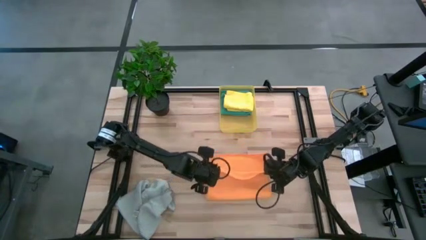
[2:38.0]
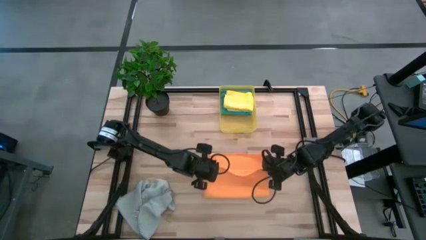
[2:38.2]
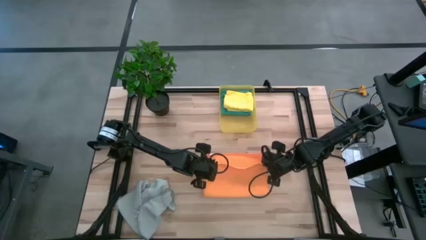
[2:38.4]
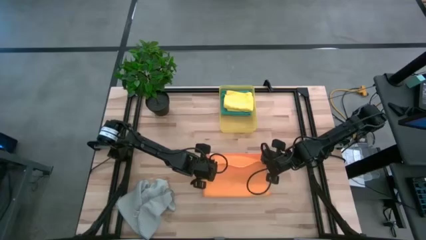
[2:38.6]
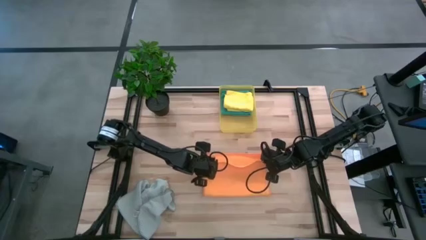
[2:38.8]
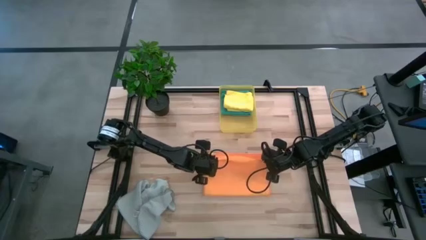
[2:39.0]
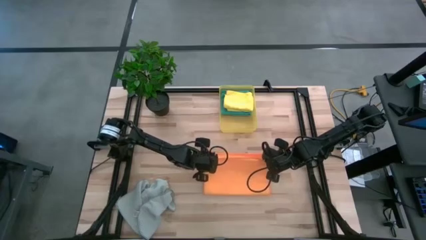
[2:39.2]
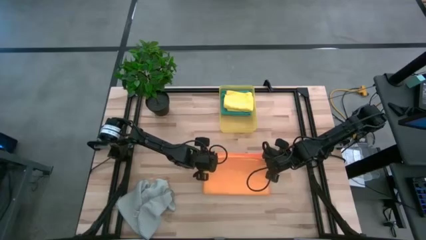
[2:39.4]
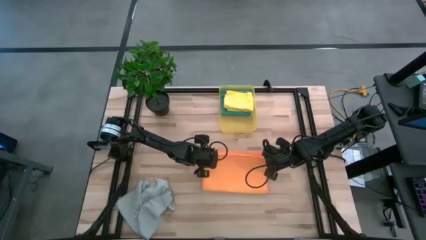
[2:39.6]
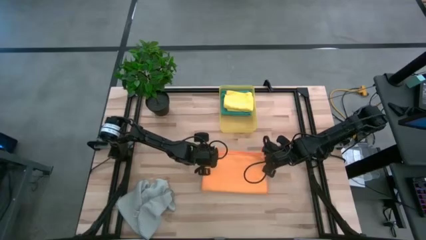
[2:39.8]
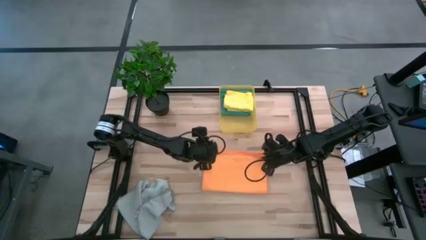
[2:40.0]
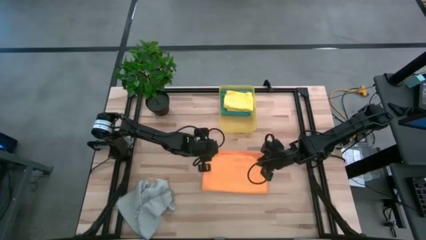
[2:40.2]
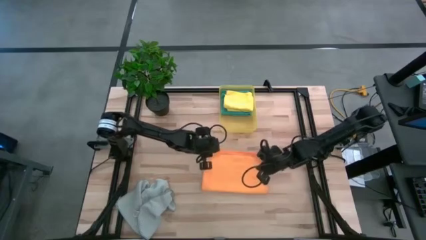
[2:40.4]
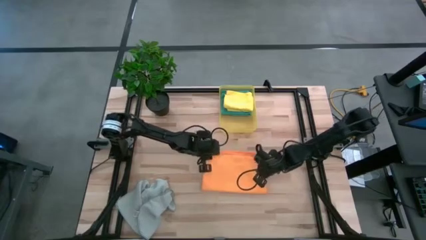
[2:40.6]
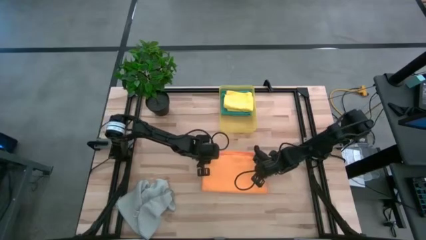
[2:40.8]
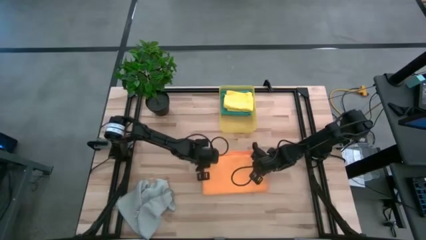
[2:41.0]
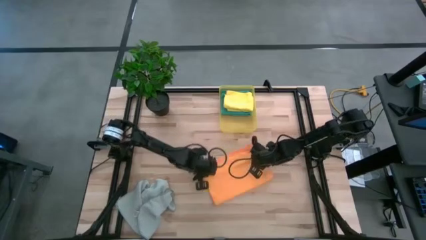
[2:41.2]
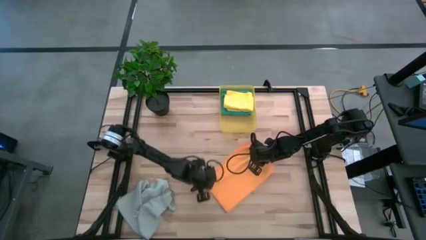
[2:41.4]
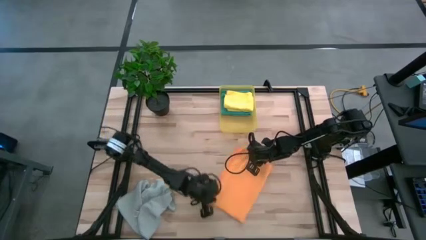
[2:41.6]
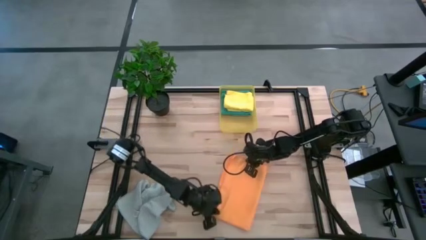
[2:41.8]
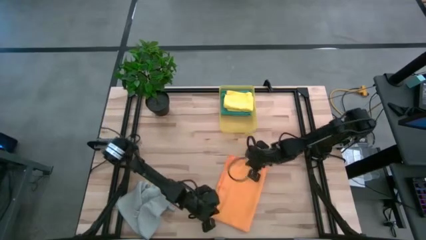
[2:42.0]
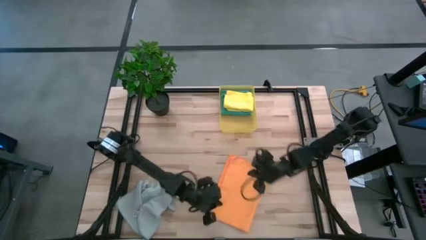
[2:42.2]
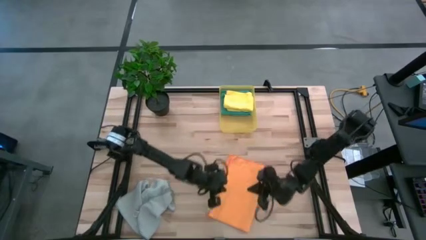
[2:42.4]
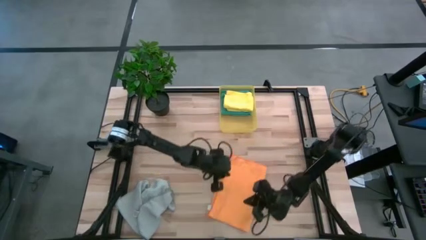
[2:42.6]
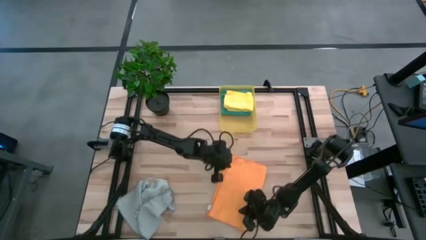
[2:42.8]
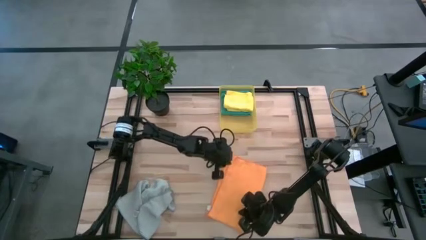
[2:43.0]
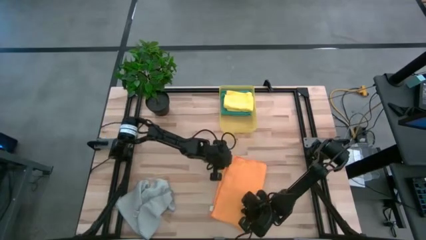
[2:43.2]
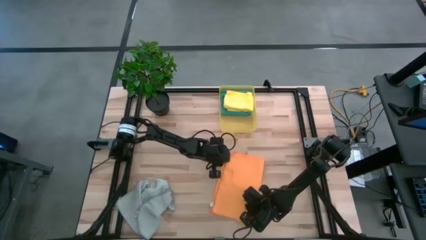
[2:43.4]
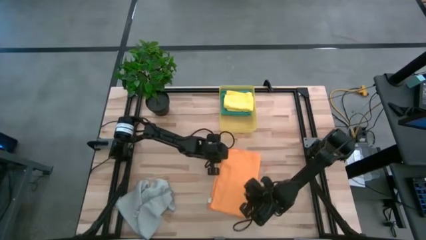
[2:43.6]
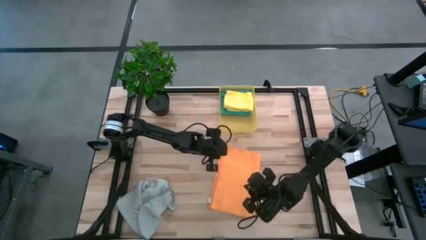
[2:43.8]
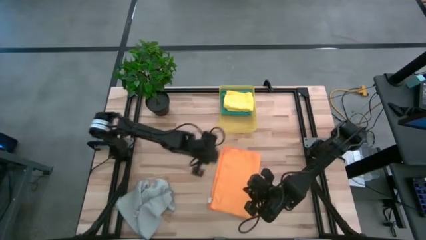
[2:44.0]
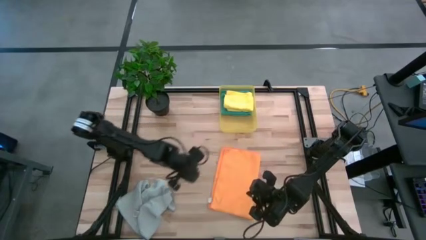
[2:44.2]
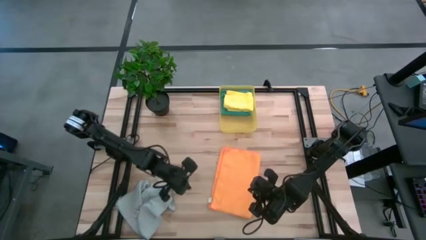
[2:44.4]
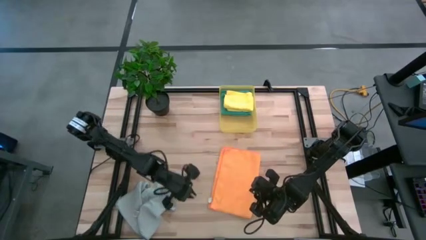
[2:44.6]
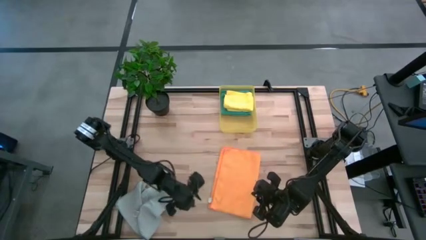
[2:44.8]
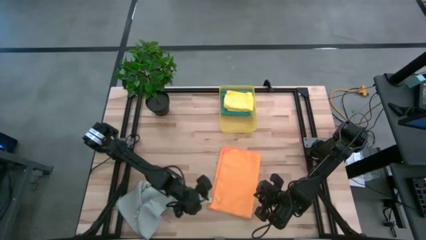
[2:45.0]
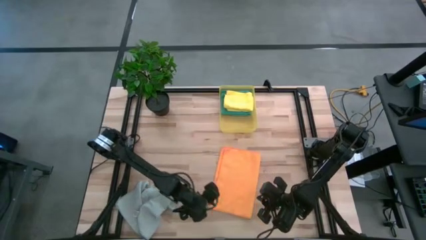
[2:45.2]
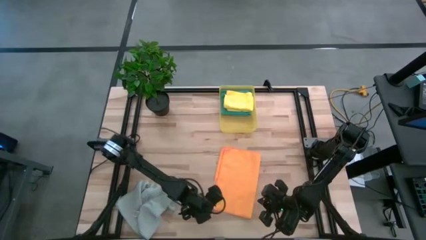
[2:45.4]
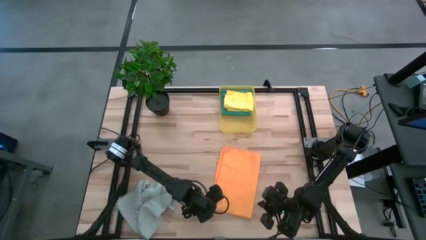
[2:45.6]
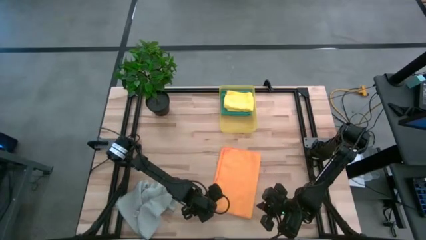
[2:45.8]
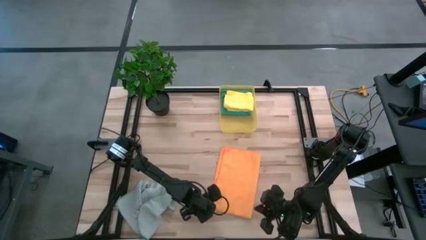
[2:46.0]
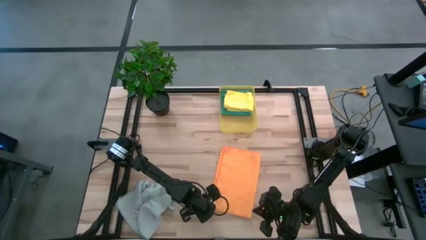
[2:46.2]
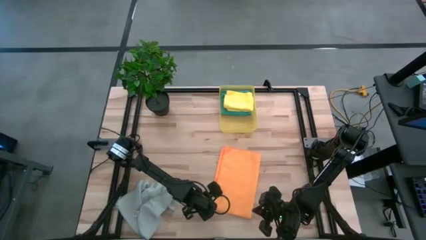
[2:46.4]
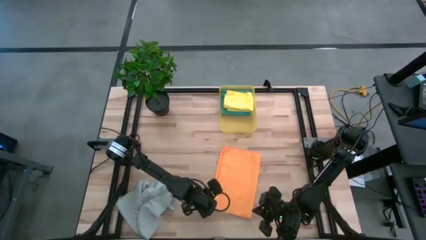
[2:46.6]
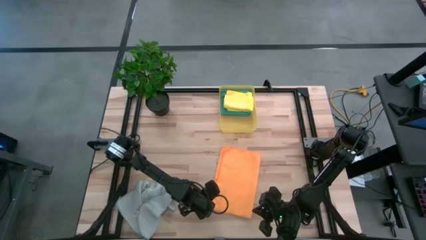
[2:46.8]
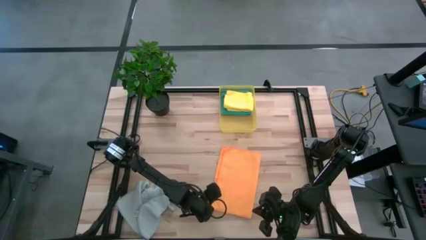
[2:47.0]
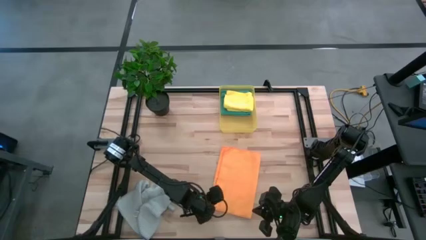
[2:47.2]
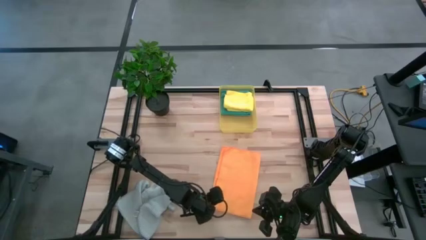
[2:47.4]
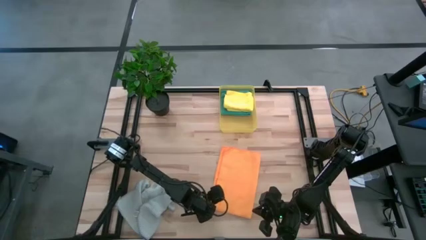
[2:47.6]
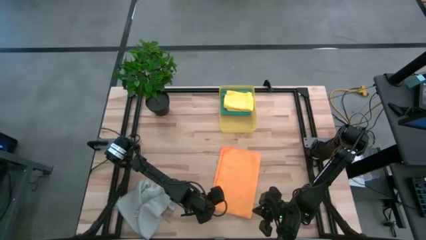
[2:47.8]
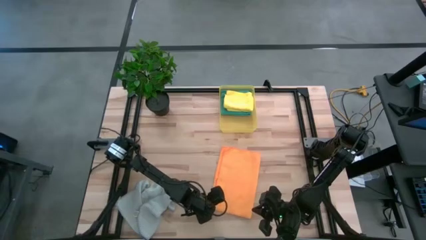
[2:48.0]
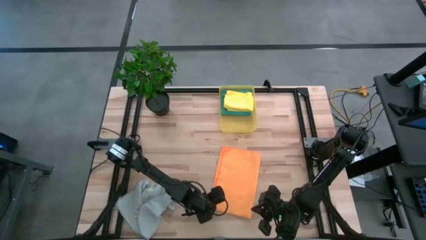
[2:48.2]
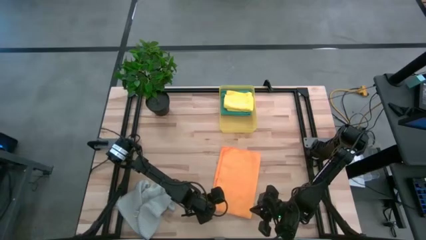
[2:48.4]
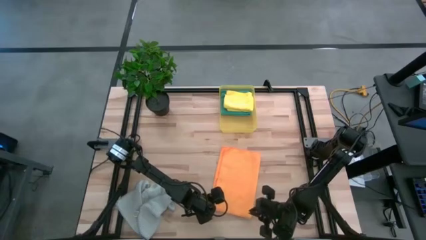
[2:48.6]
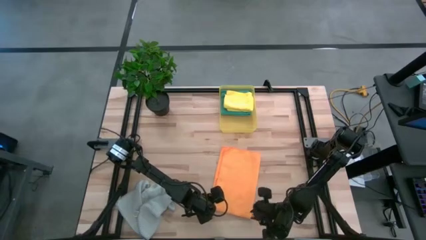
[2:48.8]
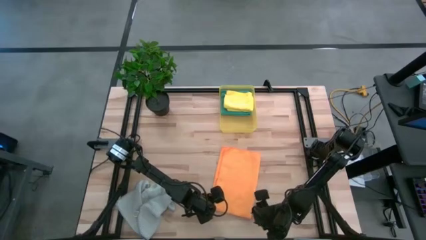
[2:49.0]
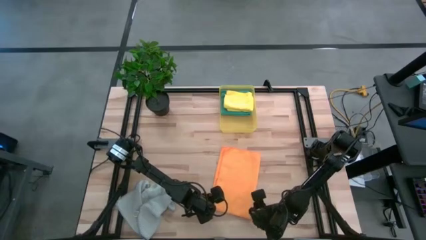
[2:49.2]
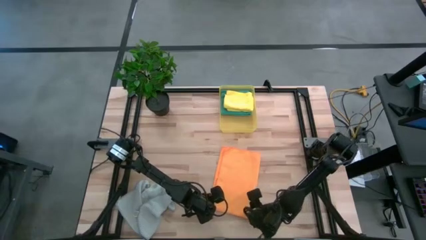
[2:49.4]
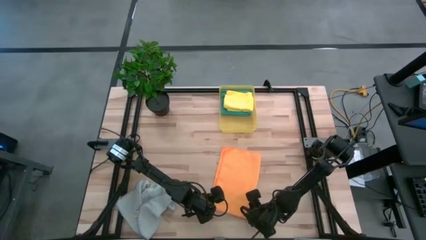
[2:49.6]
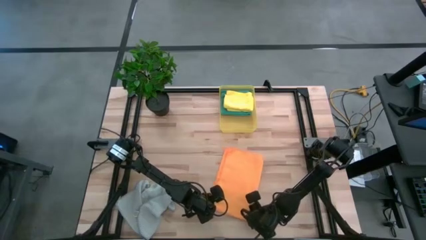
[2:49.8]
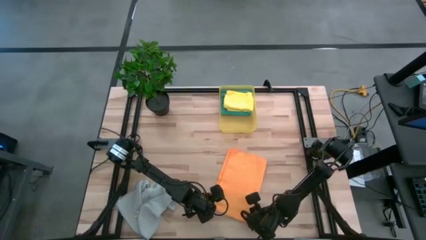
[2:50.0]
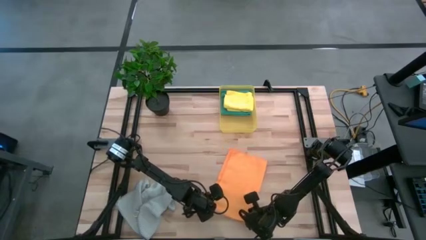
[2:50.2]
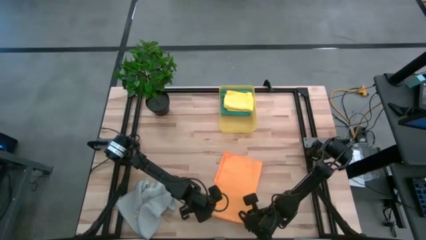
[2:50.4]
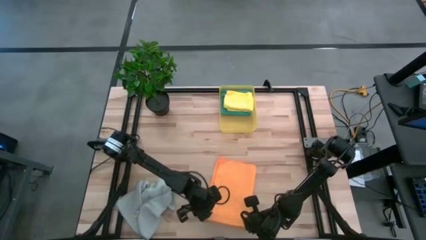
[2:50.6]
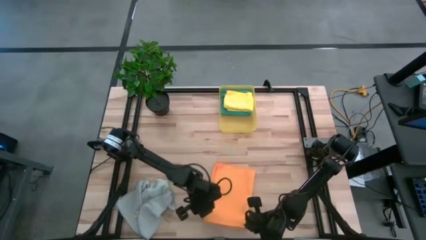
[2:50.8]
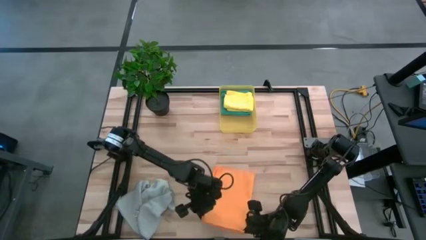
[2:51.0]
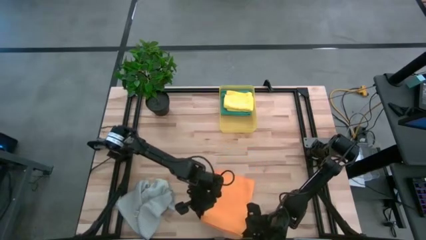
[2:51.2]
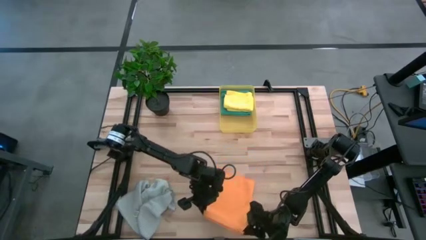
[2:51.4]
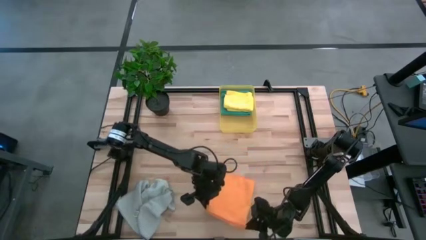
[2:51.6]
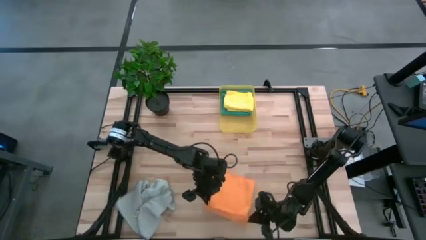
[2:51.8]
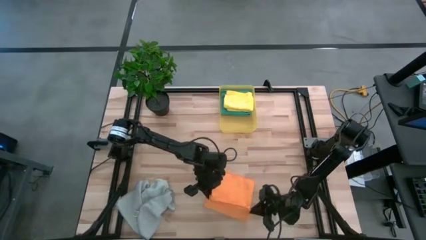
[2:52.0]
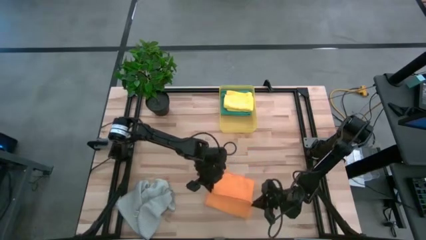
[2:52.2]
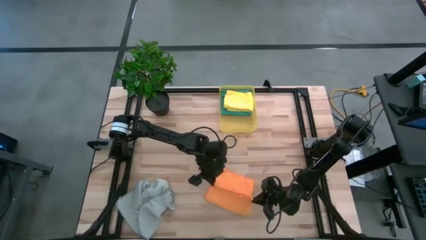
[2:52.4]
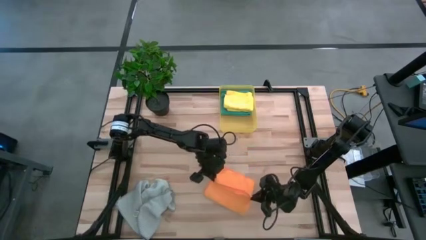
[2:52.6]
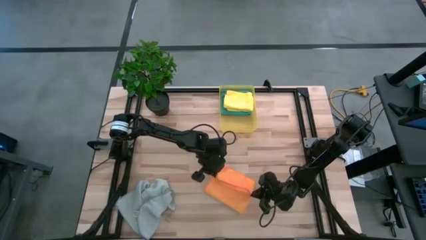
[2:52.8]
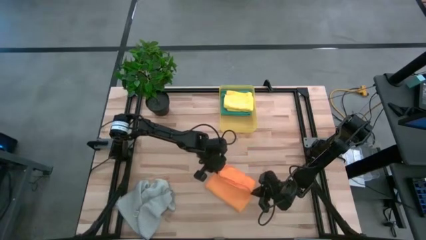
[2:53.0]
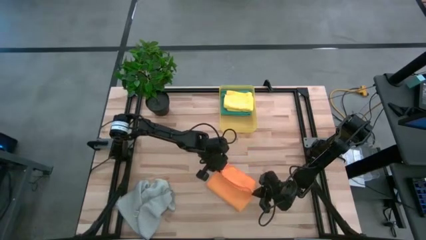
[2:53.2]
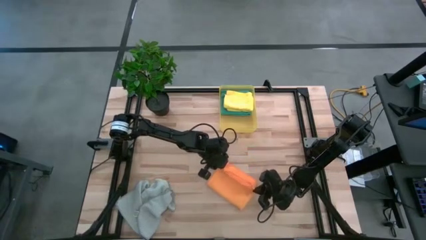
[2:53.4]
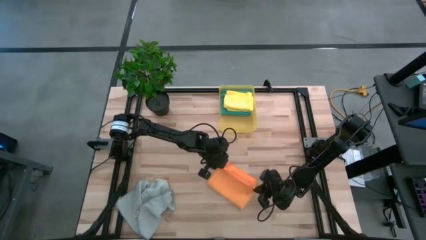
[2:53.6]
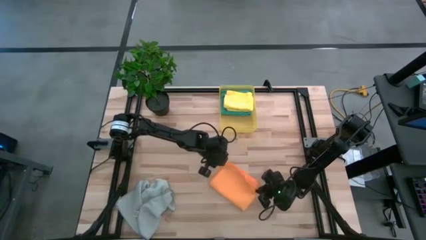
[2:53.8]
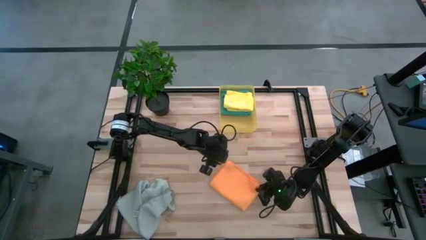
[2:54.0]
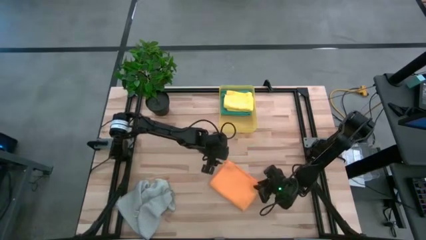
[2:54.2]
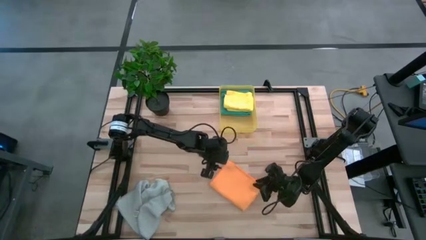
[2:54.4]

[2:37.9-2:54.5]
Task: Fold microfiber towels
Fold the orange microfiber towel
